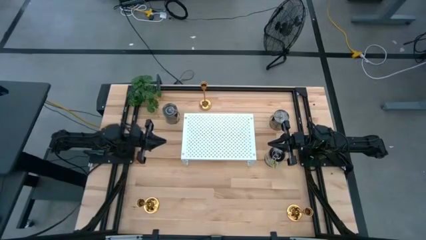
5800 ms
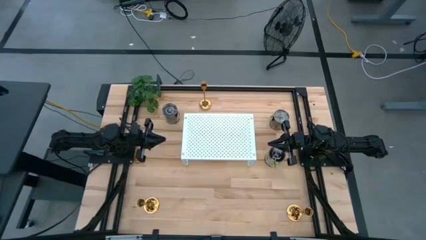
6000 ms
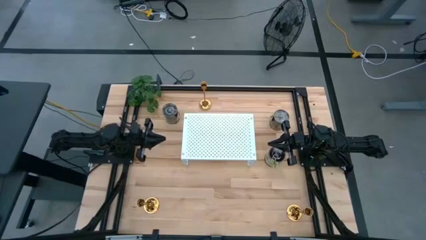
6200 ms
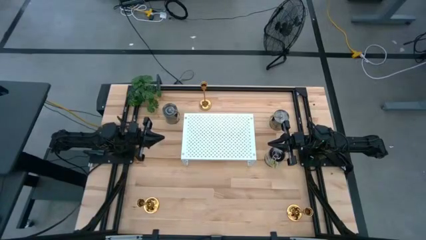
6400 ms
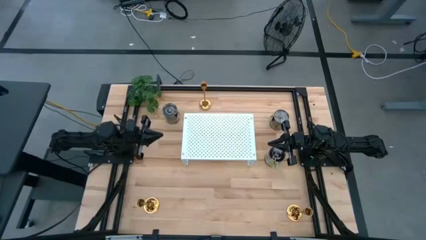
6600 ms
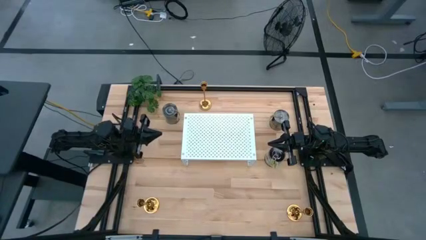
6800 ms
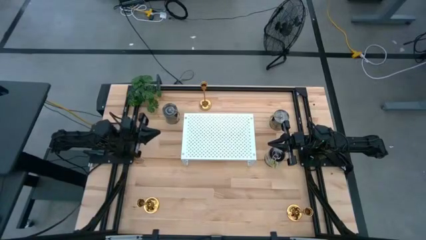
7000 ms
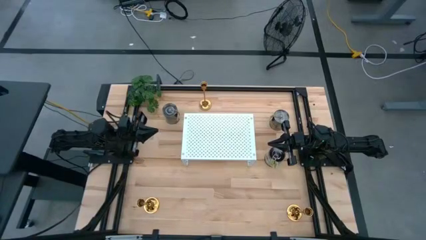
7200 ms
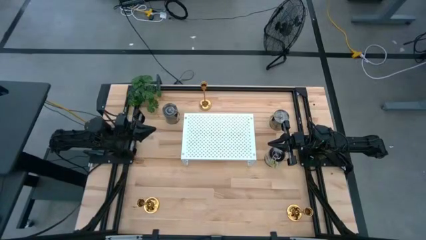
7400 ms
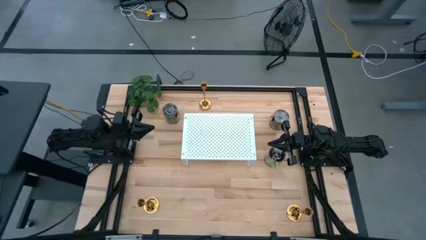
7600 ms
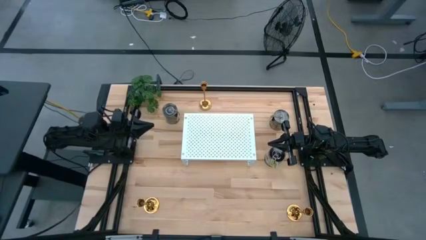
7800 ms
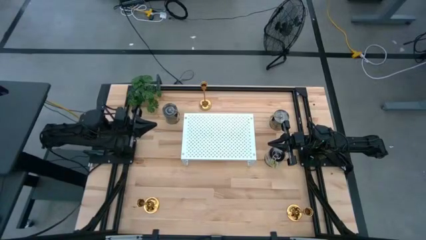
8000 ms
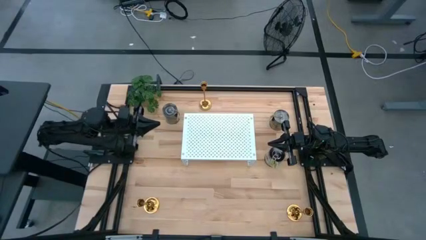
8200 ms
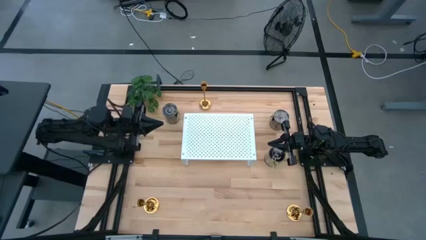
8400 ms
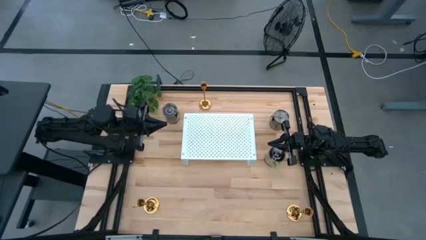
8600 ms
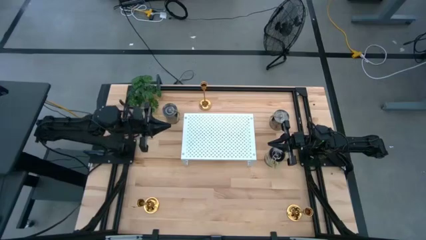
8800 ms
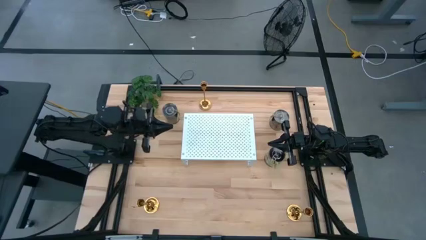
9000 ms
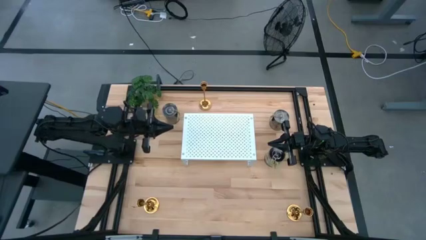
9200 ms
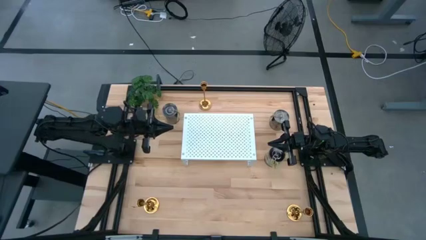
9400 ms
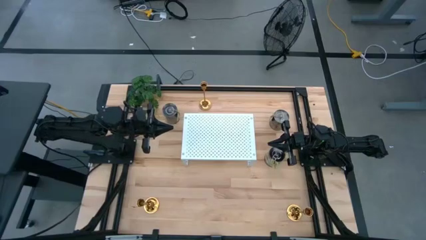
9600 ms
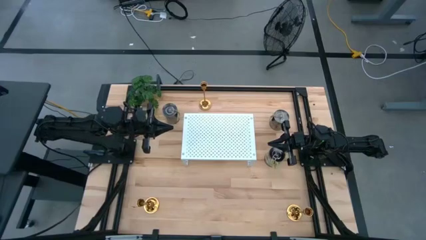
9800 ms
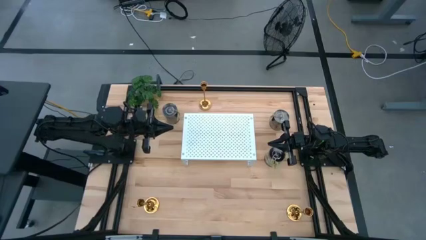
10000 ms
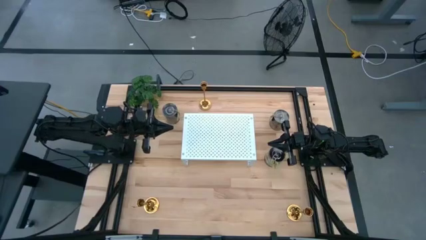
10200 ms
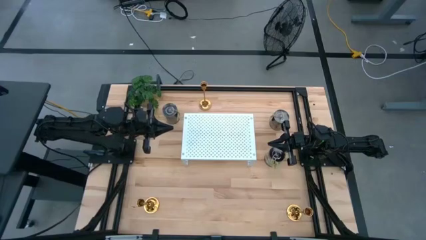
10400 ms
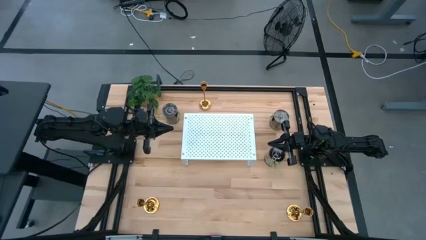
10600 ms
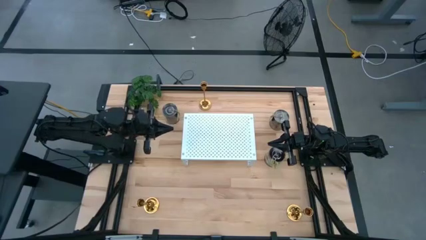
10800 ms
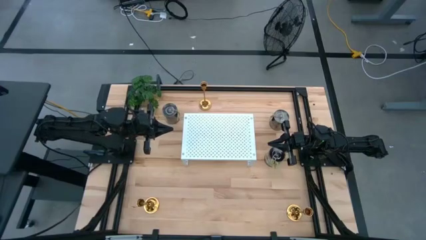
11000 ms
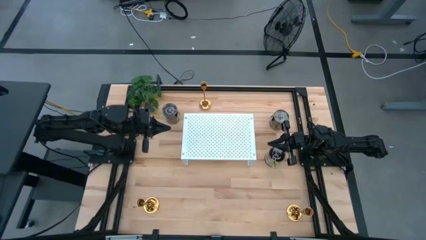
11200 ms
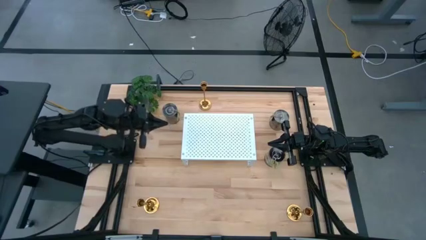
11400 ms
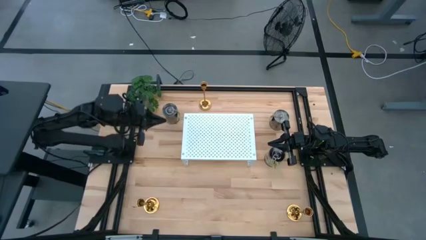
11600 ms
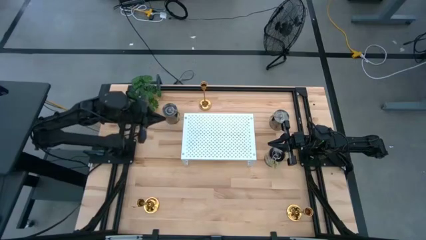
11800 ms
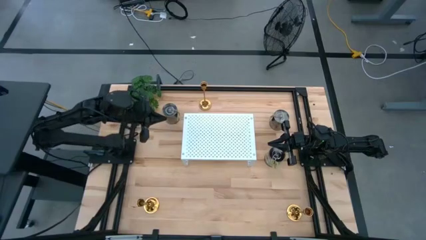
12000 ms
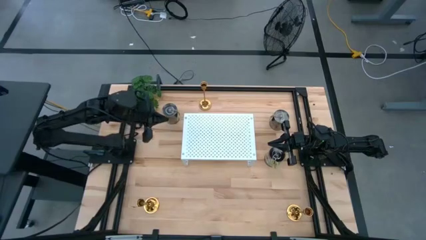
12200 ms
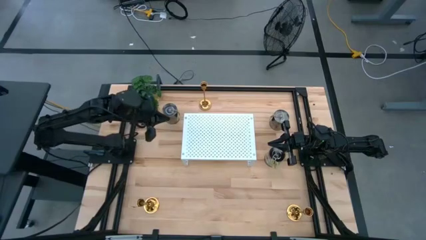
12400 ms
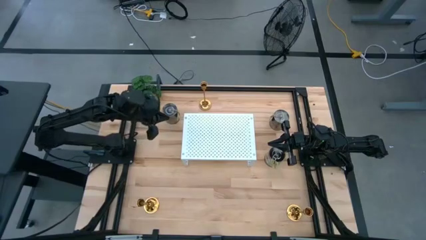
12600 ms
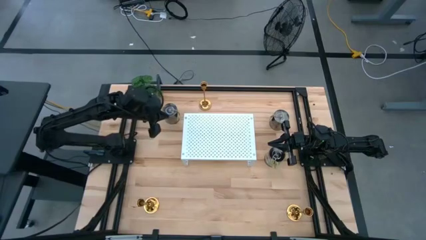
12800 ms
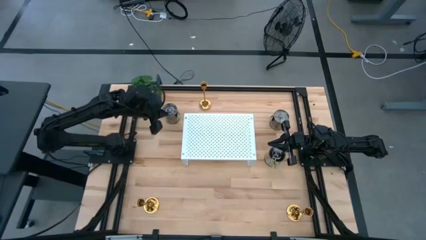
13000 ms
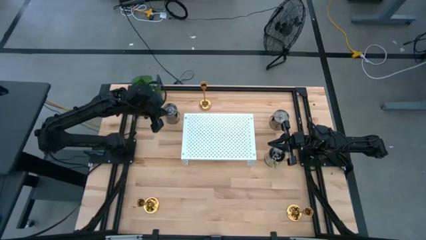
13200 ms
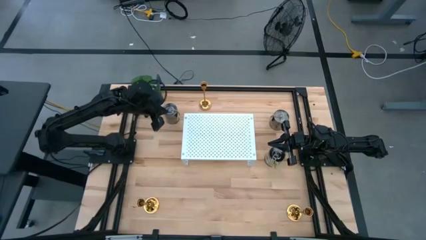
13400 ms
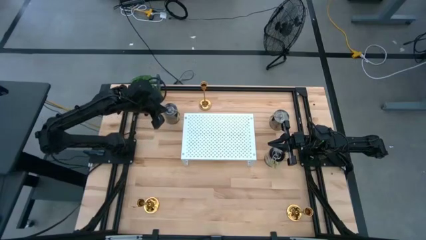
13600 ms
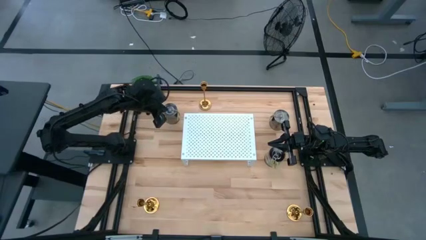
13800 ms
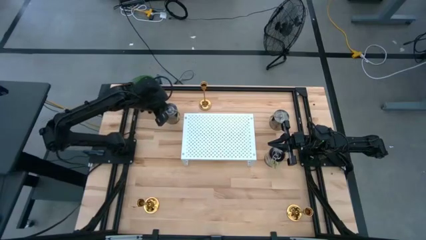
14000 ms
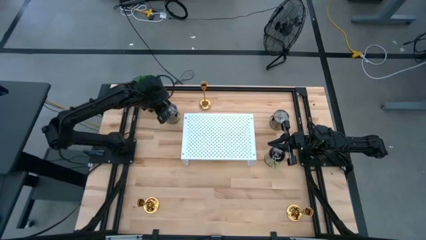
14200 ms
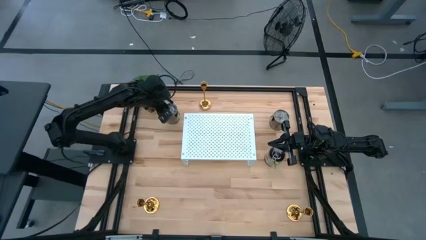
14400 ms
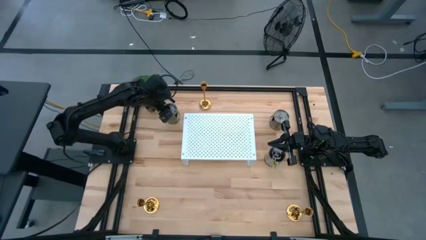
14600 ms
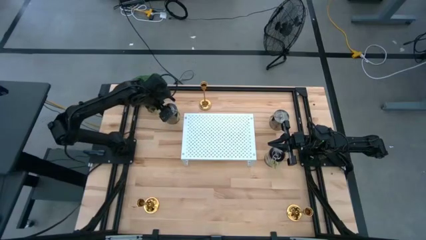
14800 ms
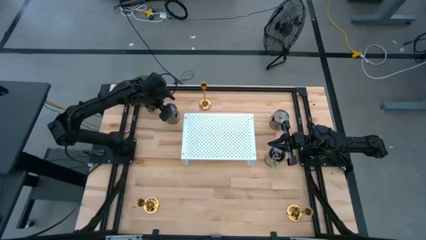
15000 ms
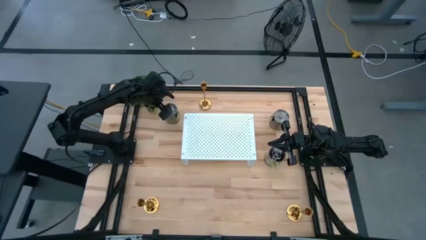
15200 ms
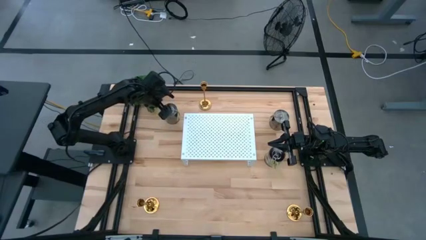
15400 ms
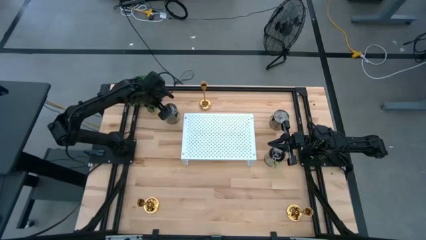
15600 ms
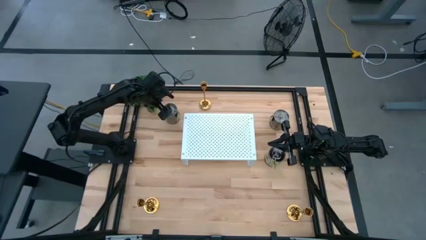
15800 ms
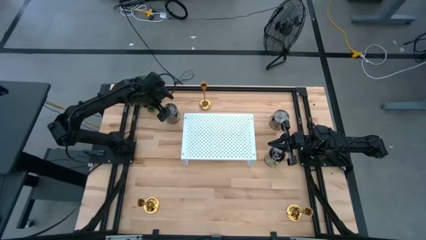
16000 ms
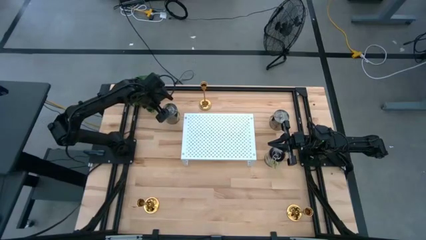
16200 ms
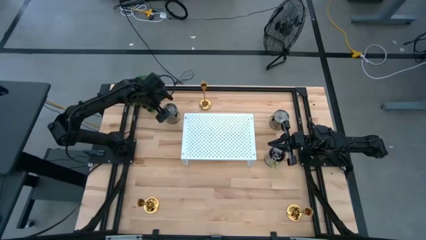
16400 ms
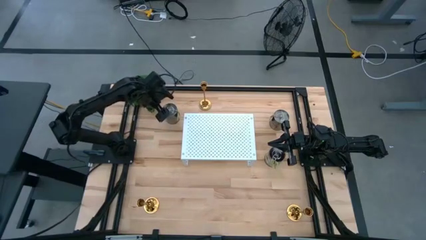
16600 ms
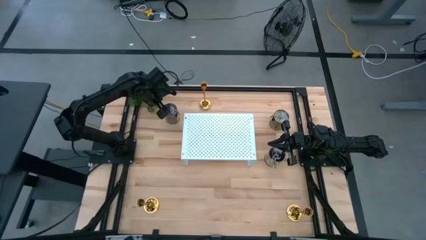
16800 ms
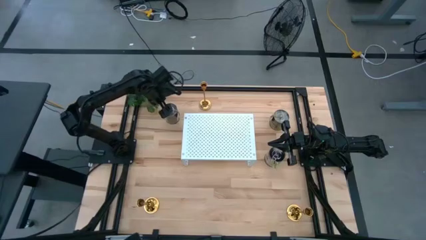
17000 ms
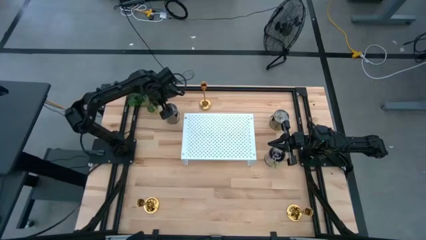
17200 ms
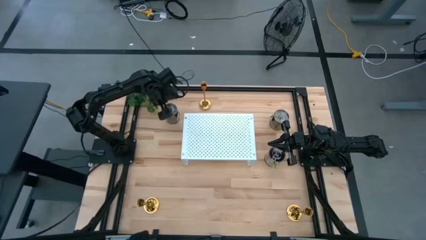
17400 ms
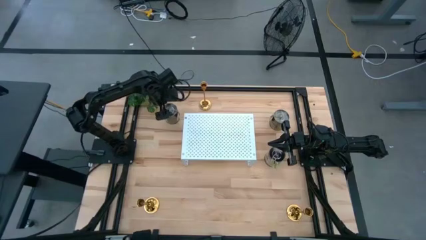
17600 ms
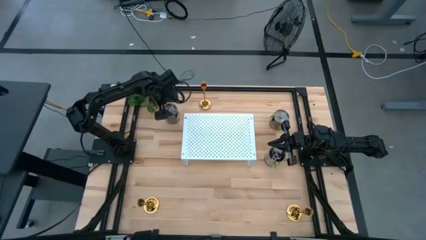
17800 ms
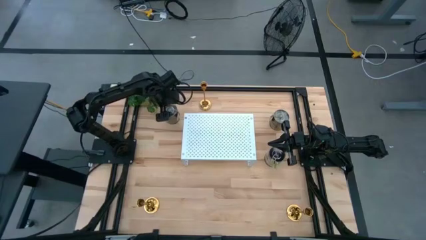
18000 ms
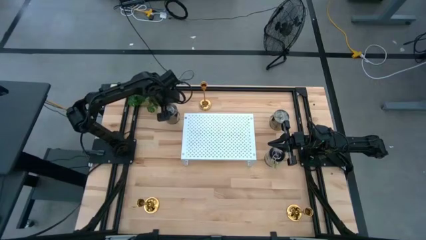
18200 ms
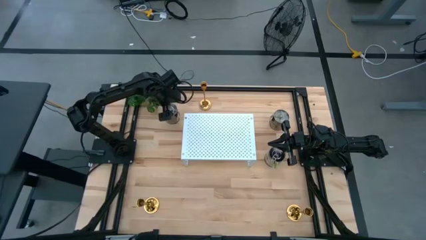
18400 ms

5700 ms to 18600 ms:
Task: Pick & Place candle stick holders
Put the left metal lid scented candle on the shelf

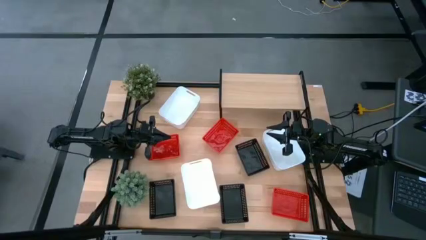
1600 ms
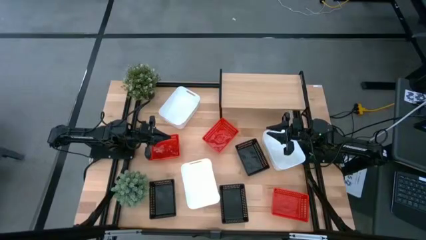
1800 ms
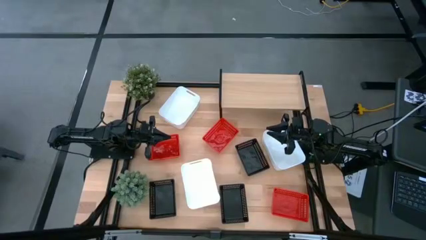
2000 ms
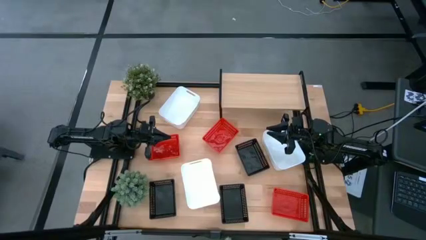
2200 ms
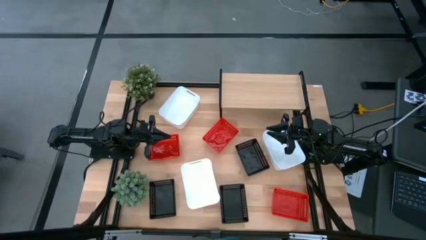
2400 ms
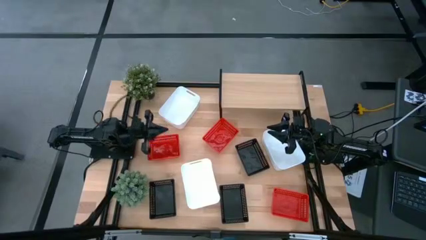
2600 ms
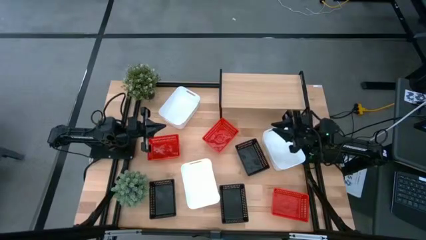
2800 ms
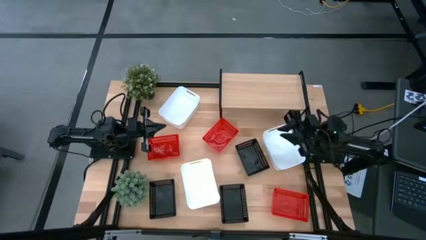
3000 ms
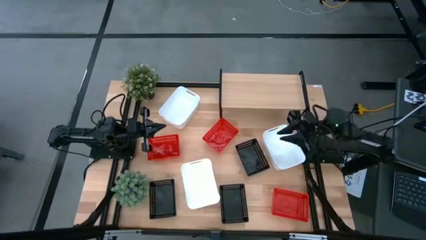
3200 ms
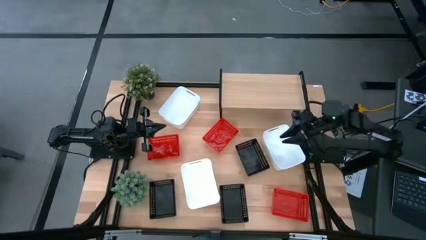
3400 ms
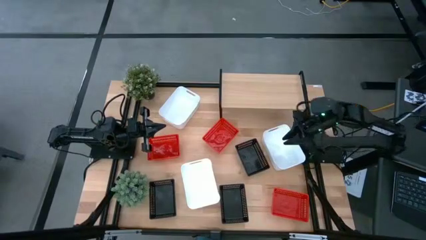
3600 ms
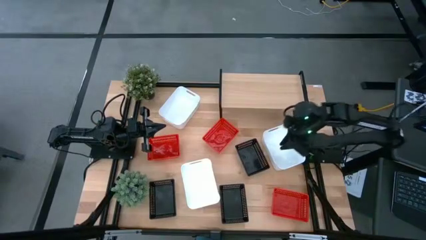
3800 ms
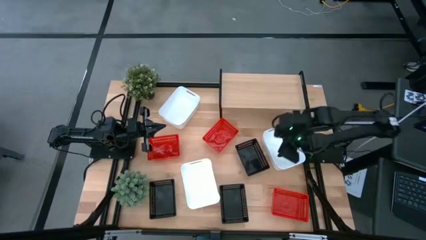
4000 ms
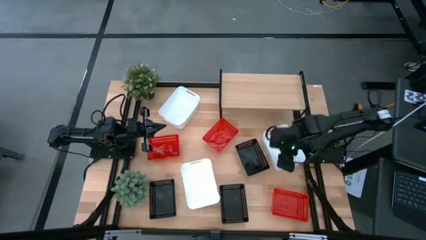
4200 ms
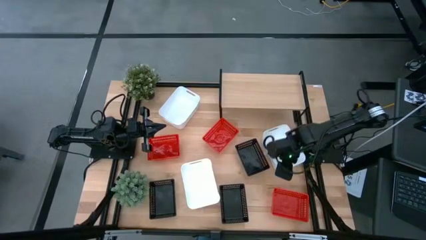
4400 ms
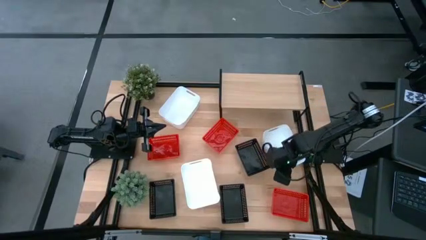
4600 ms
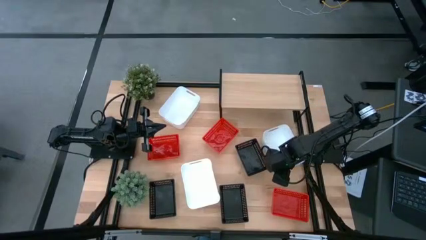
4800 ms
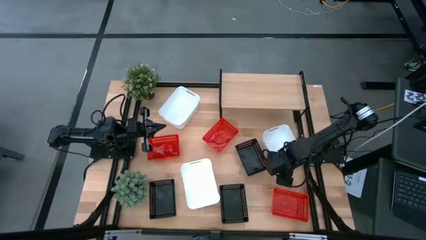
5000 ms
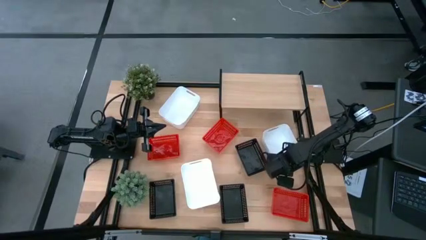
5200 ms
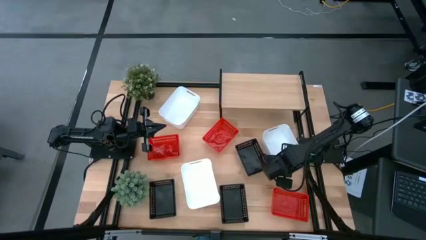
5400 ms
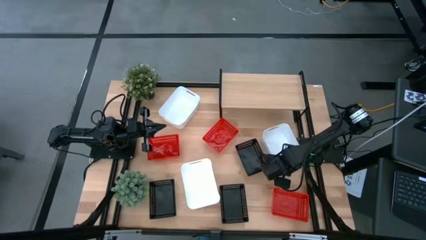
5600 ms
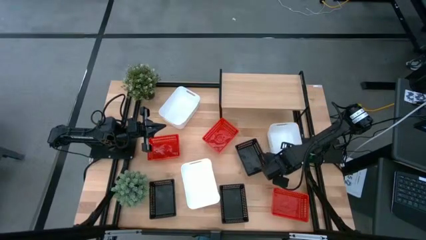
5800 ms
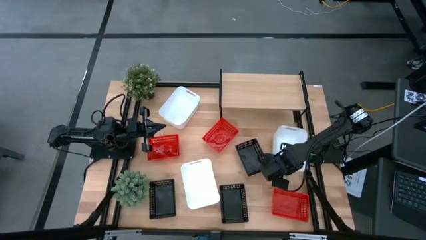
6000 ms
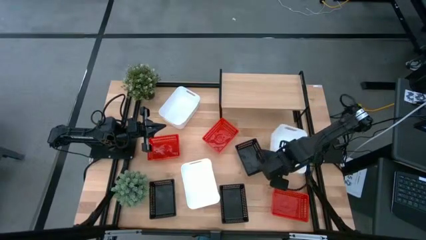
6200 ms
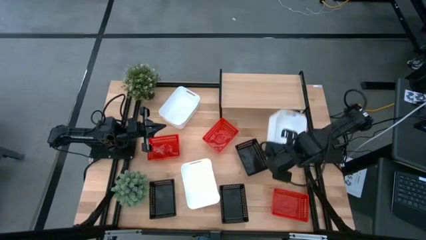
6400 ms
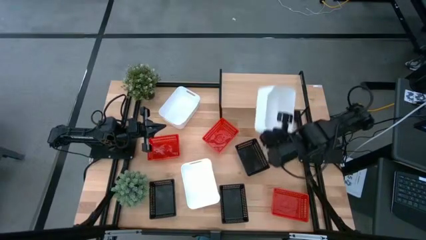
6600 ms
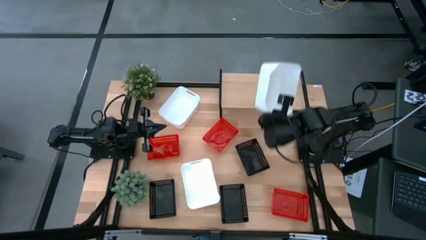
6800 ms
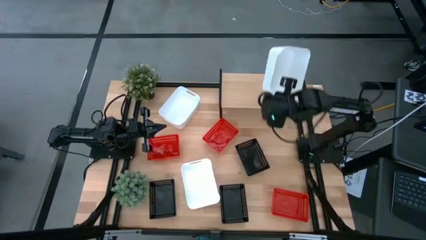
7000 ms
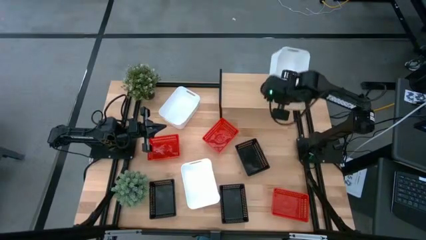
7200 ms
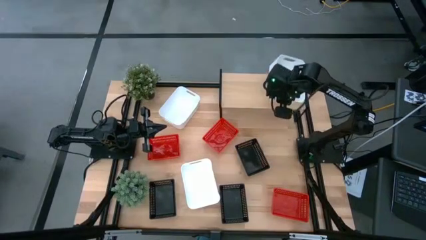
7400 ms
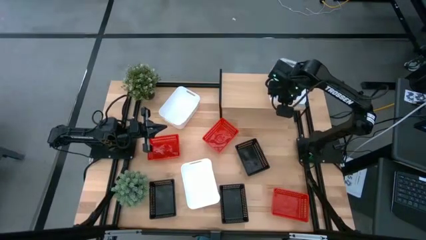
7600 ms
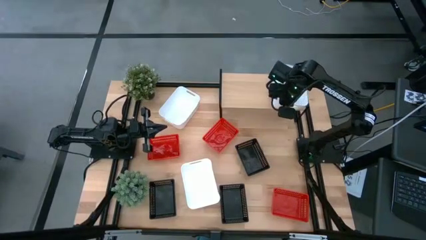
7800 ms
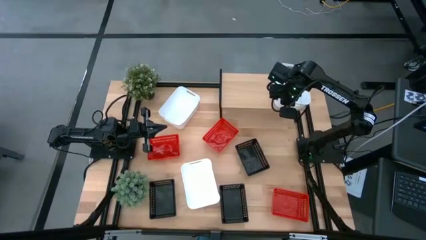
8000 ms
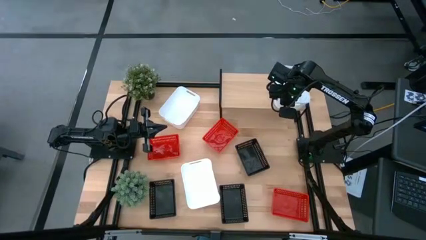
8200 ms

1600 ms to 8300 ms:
Task: Stack baskets on shelf by color
Put the middle right white bin on the shelf
